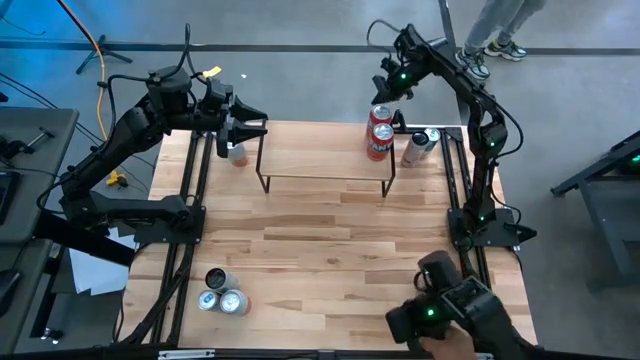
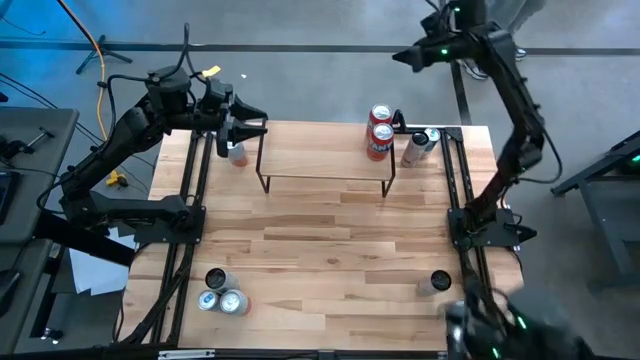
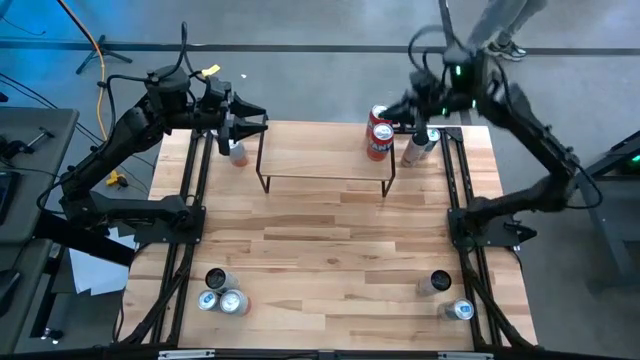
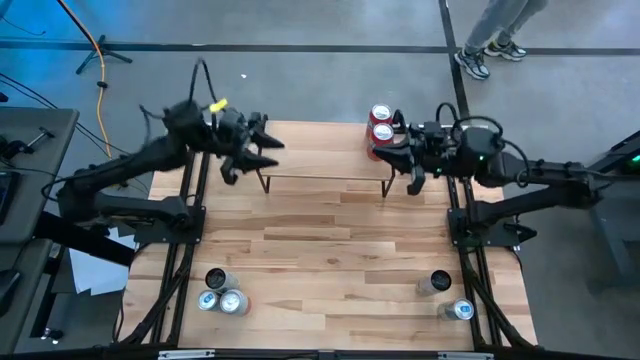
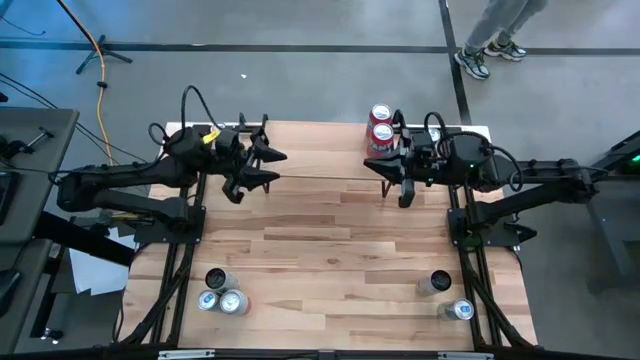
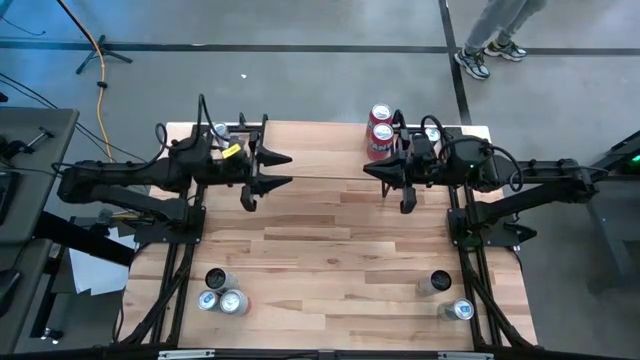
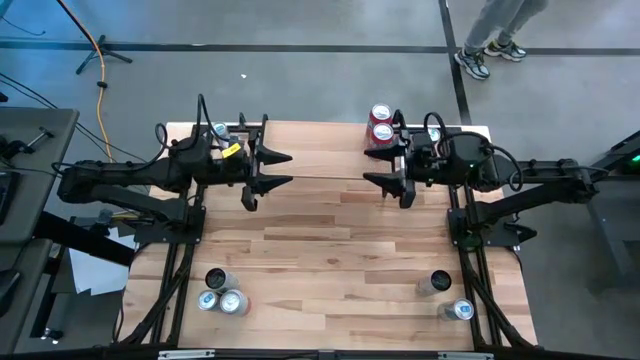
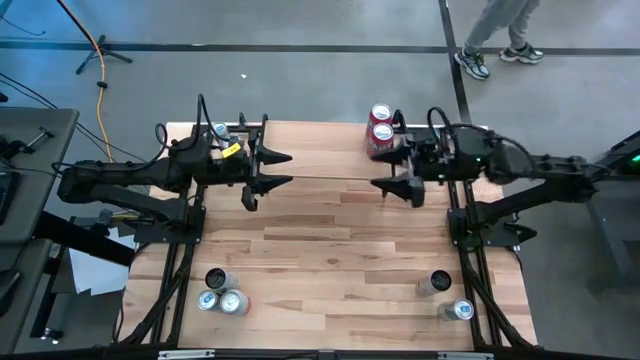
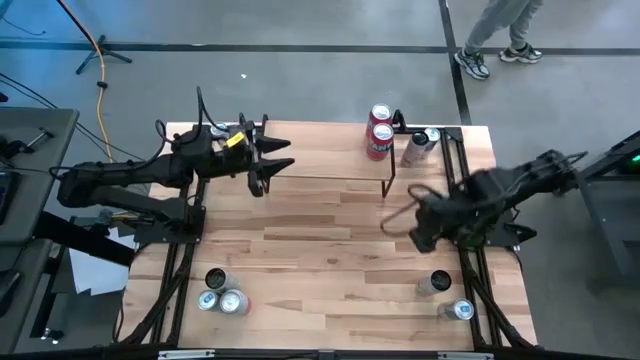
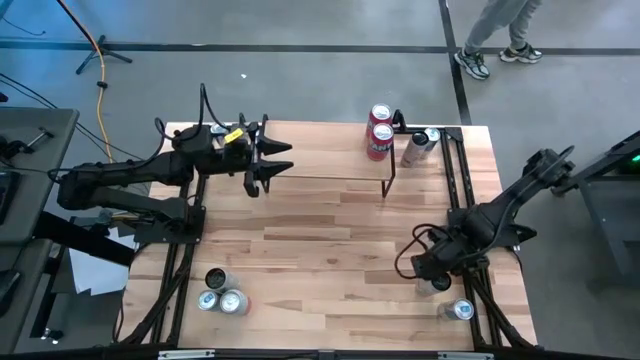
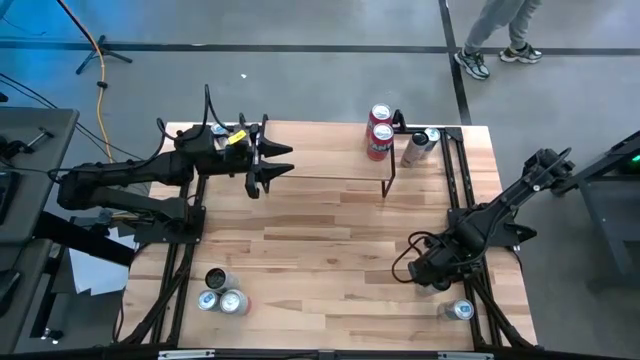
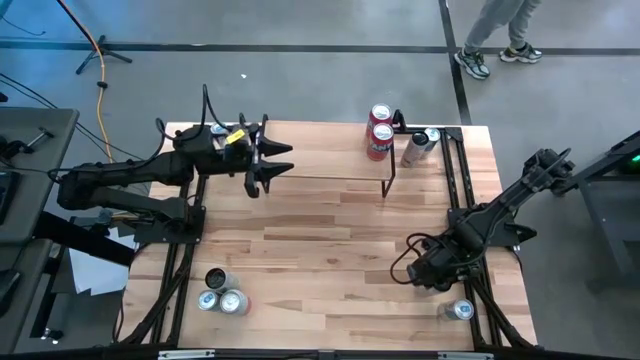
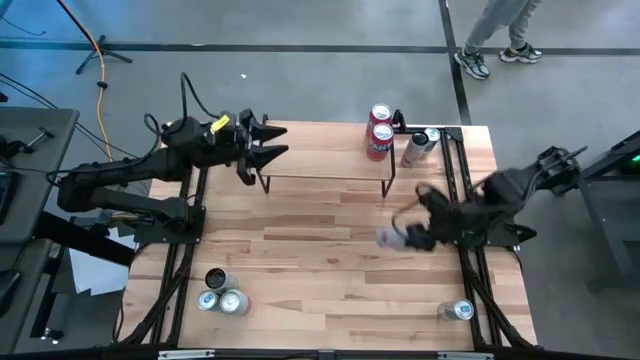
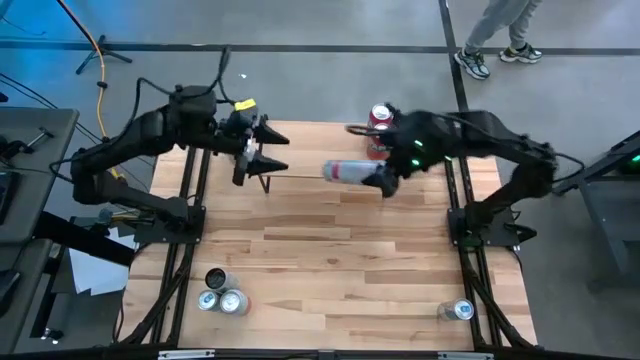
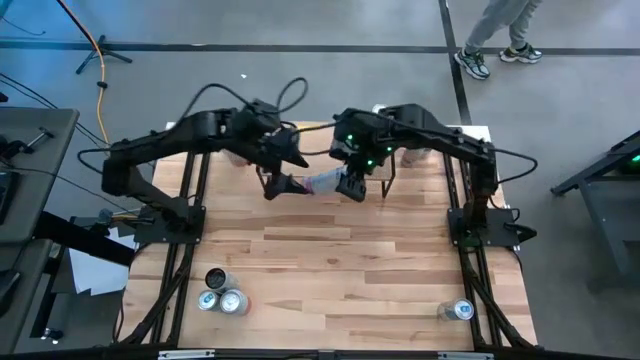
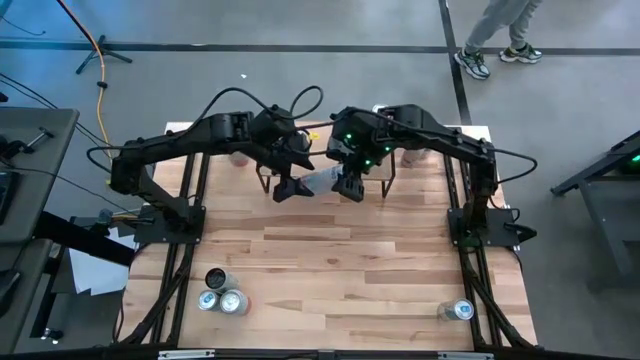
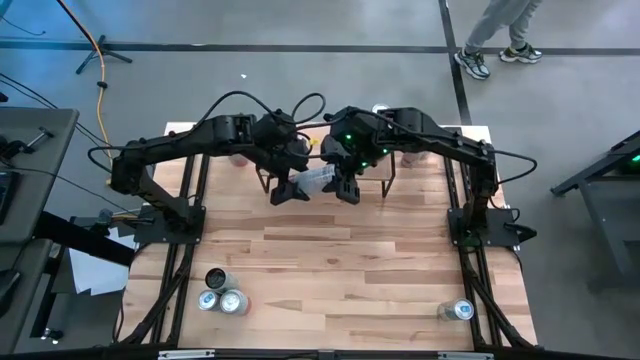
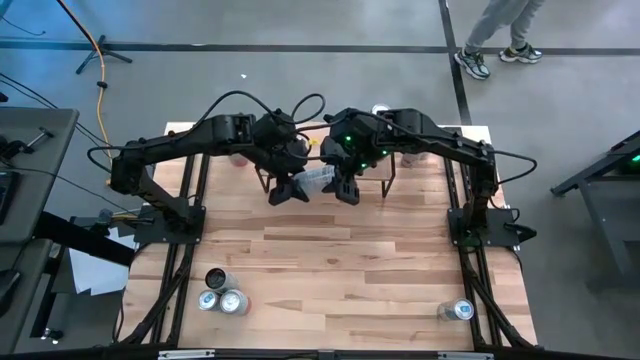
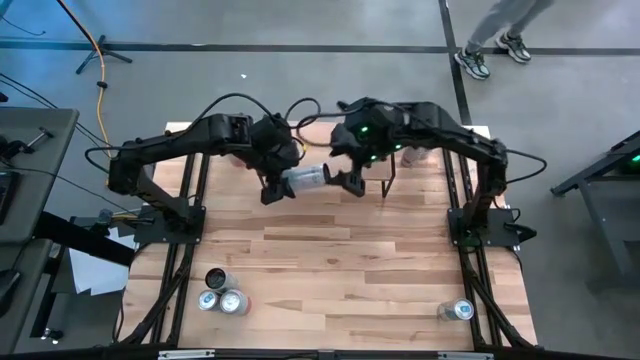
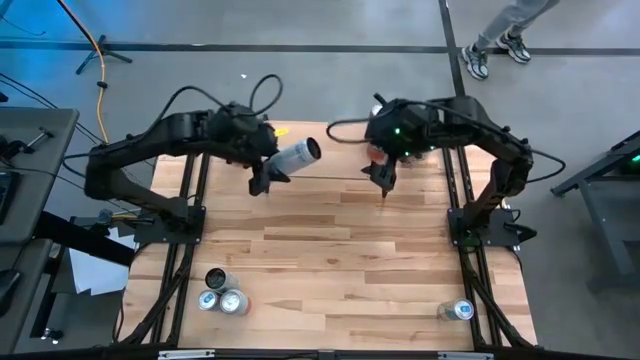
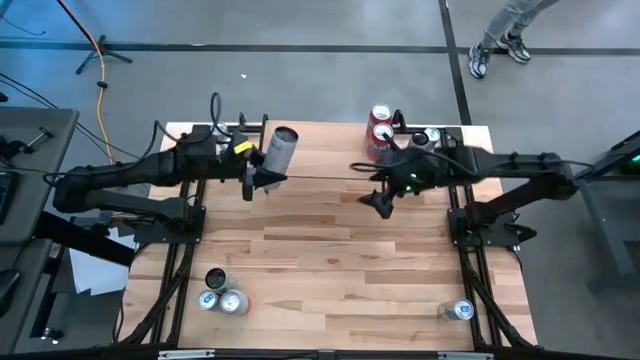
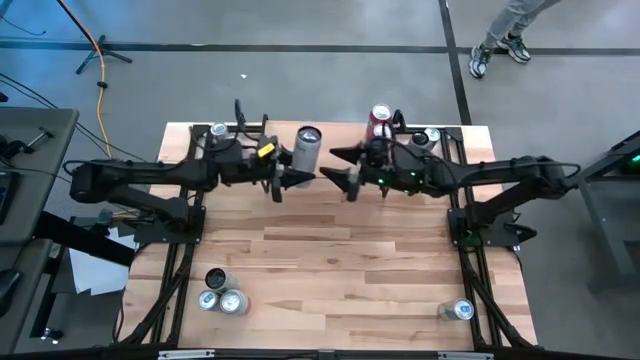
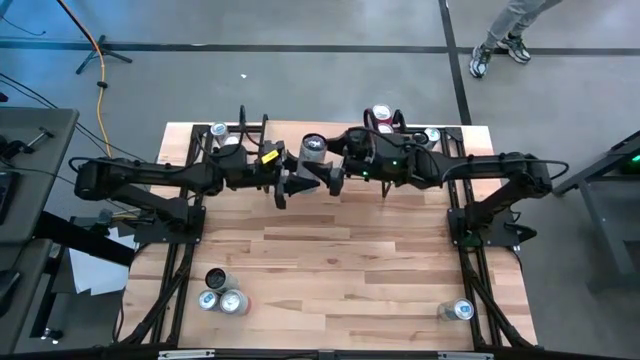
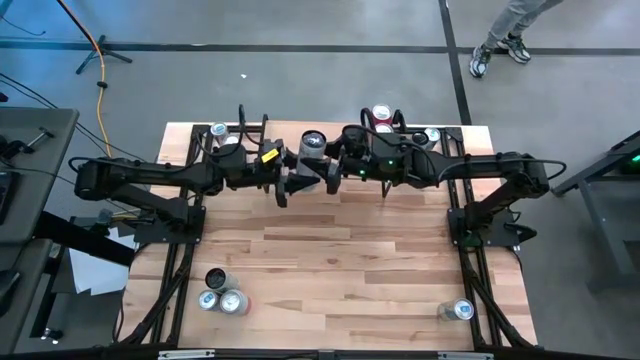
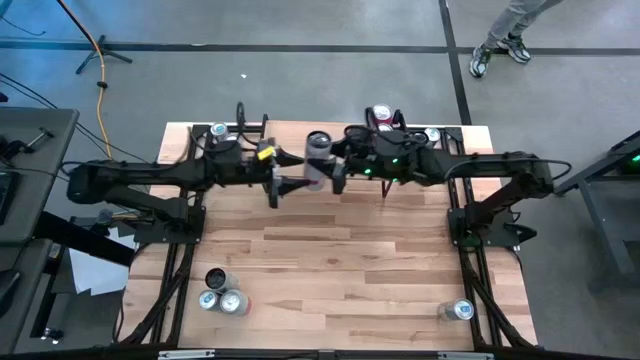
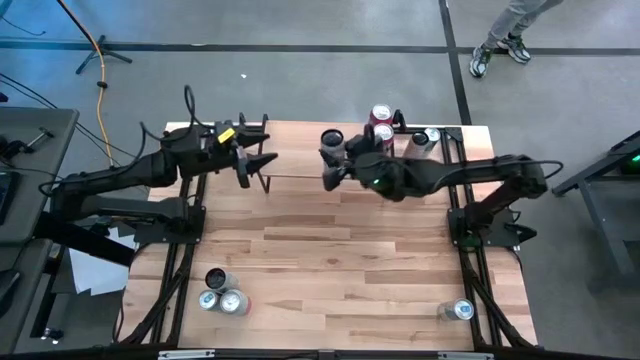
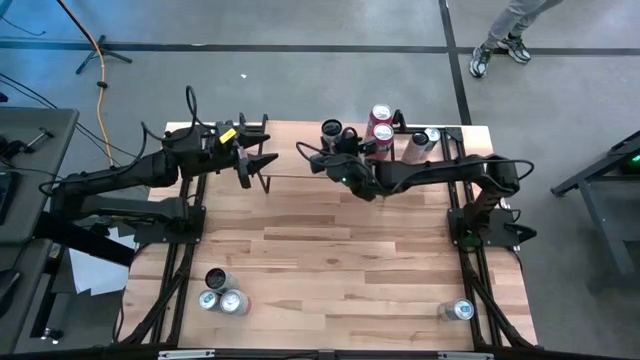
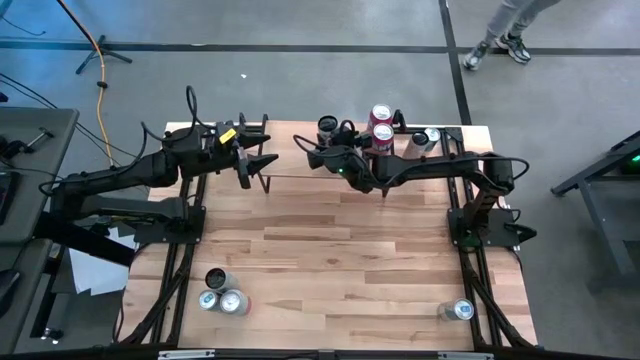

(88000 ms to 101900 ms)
Task: Place canned beverage on shelf
Put the bottom right white-pink soda can on the shelf

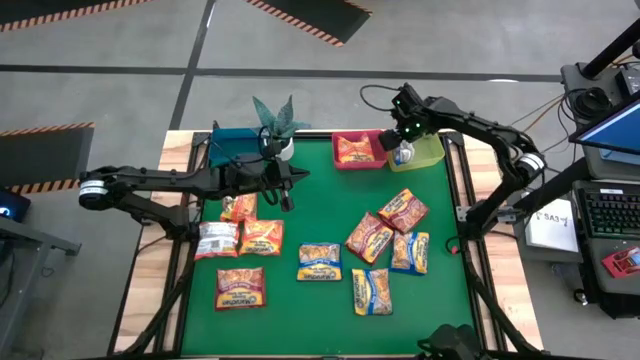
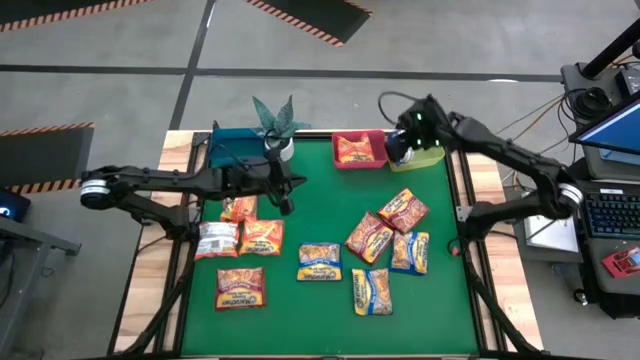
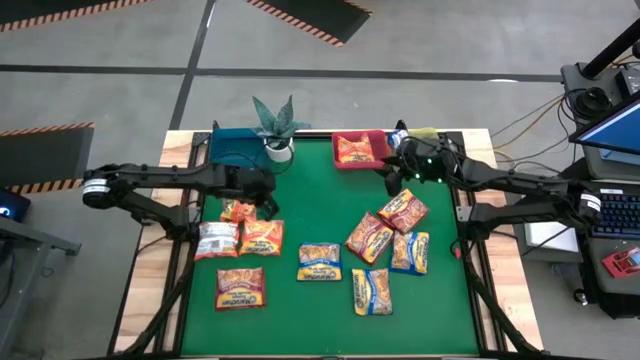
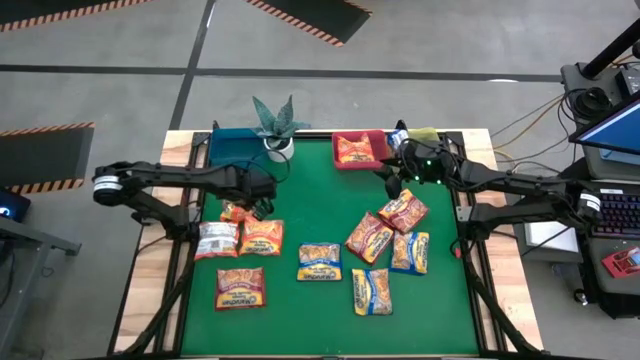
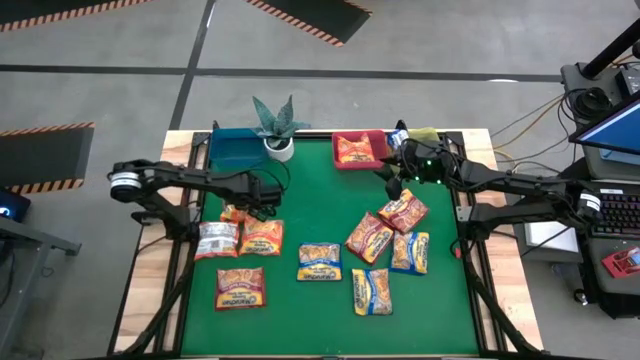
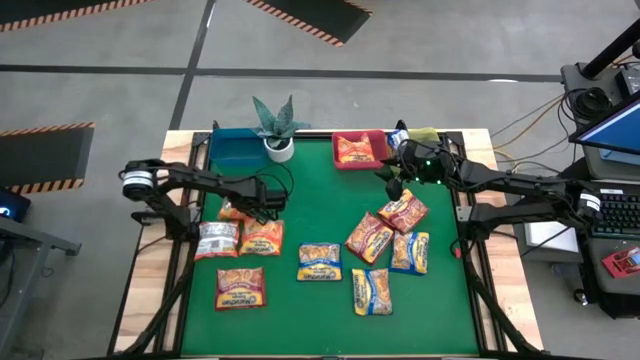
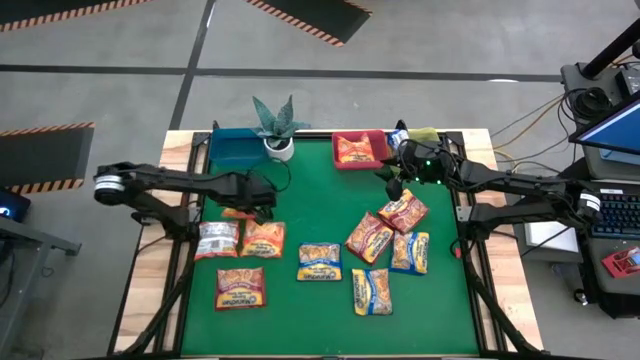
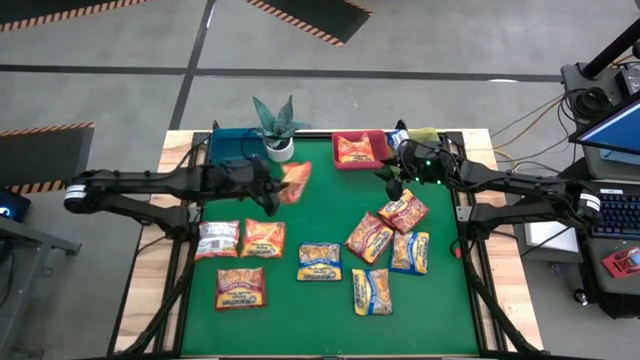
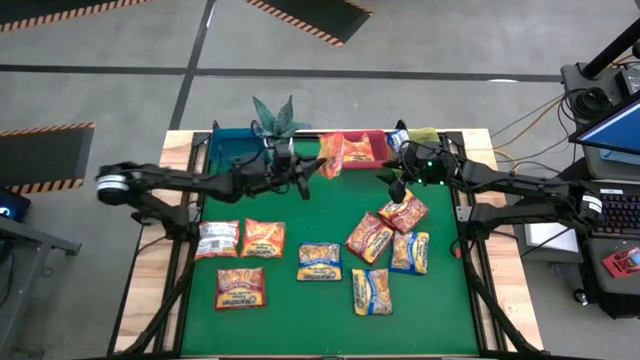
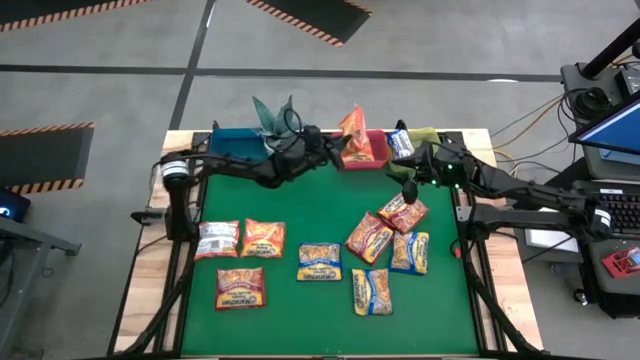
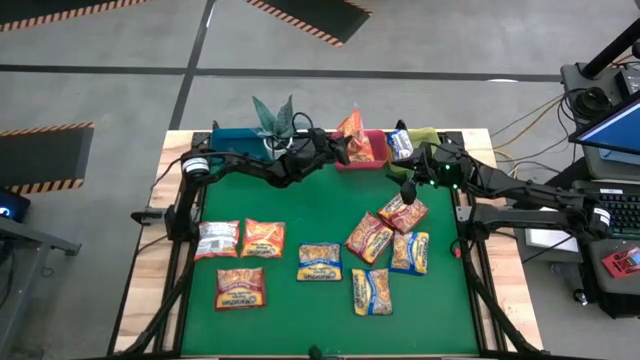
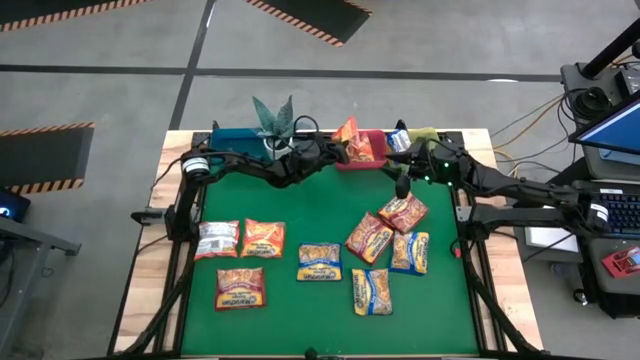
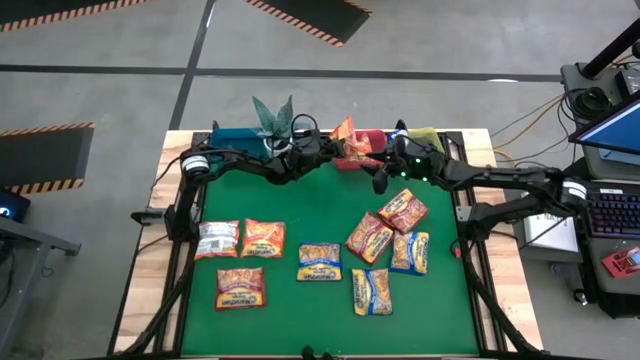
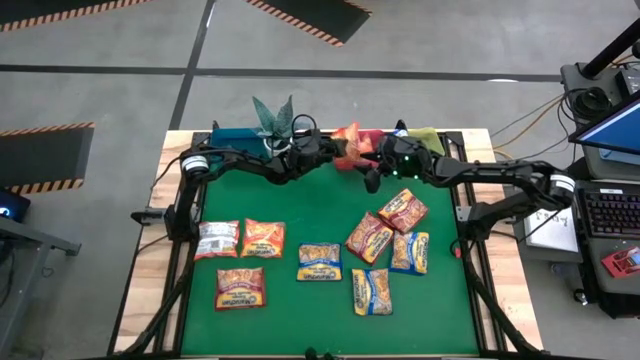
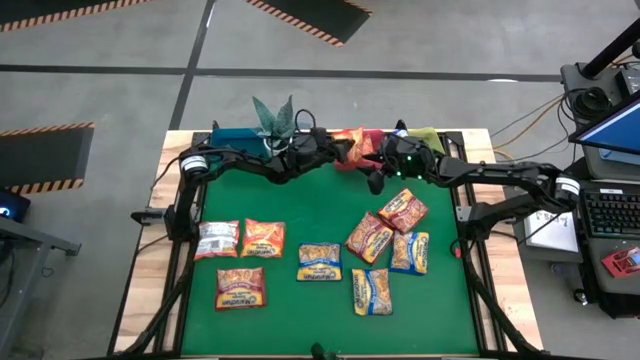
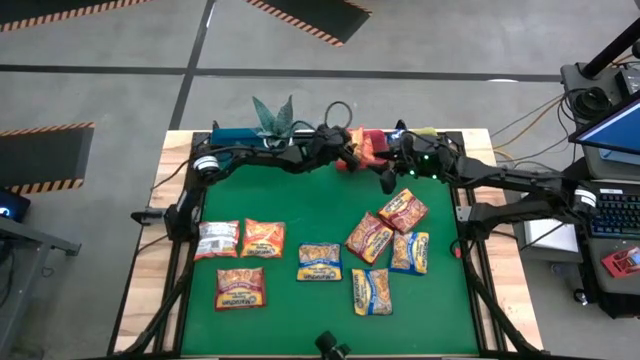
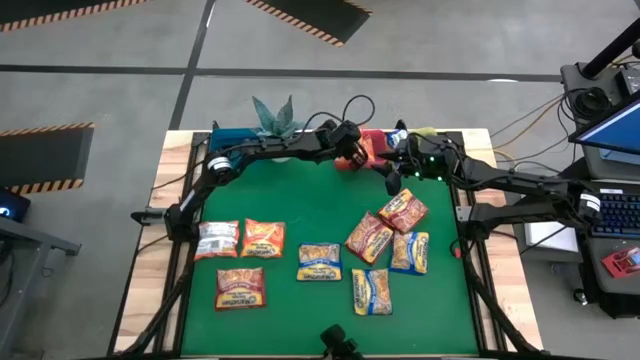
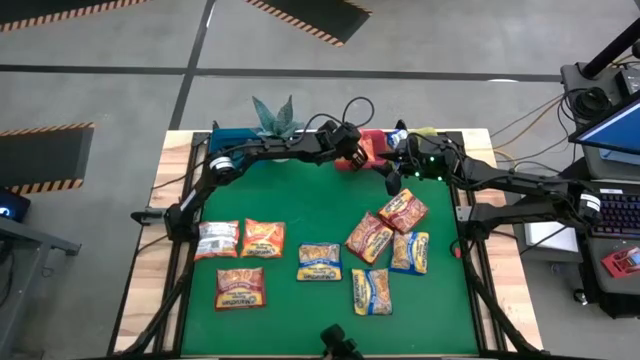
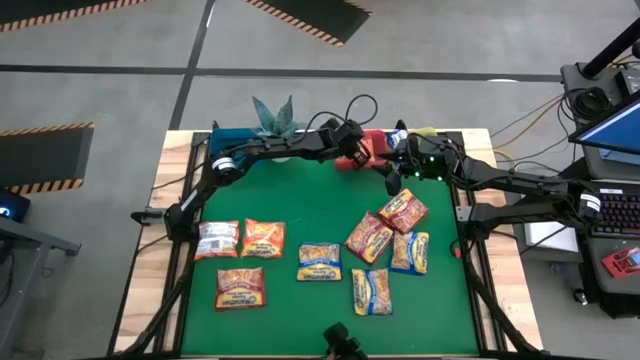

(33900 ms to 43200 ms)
Task: Sort Maruchan noodles
Put the orange noodle pack in the red bin
